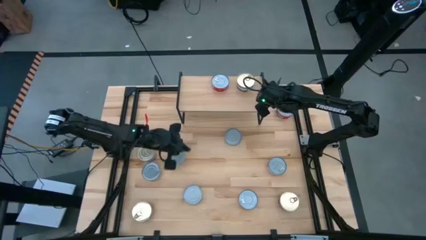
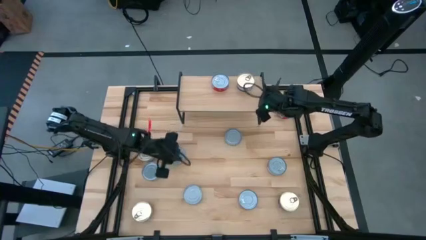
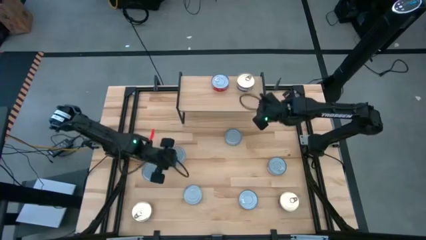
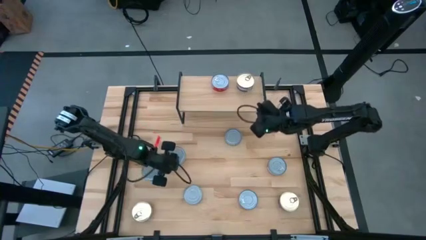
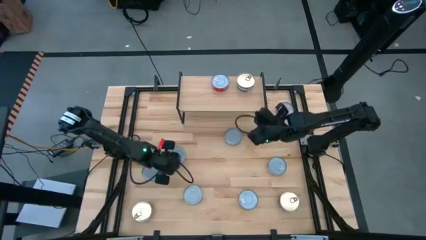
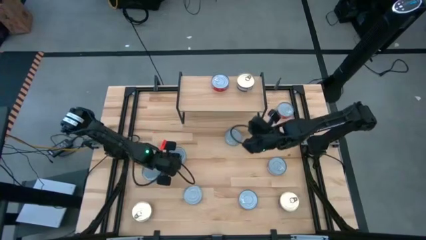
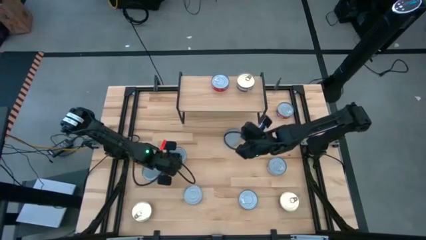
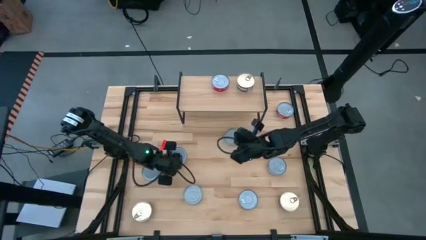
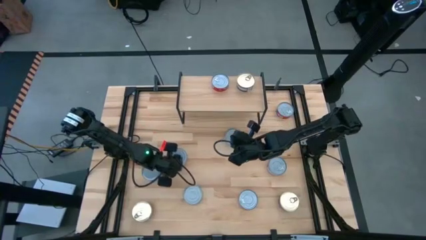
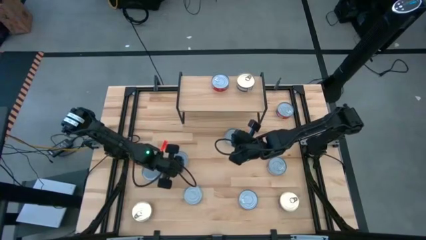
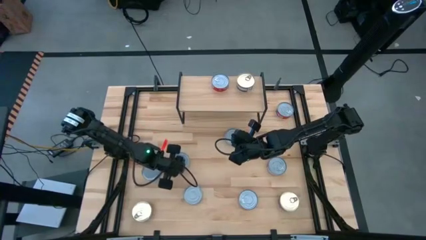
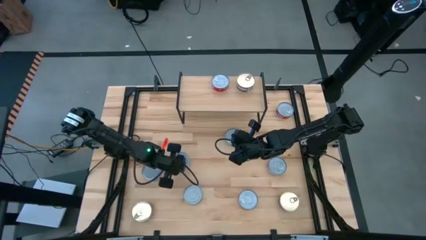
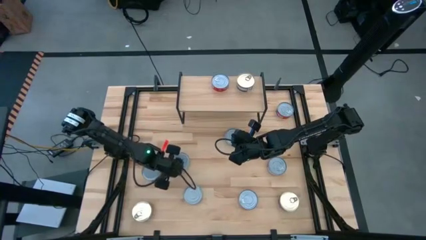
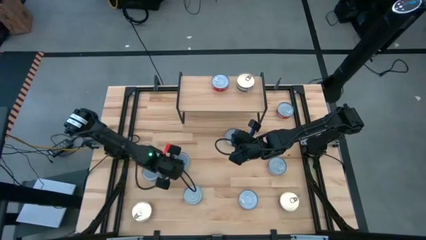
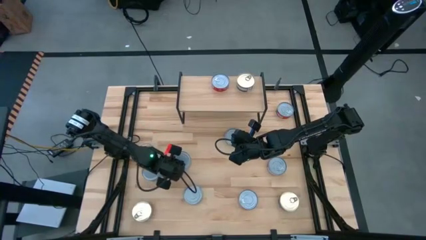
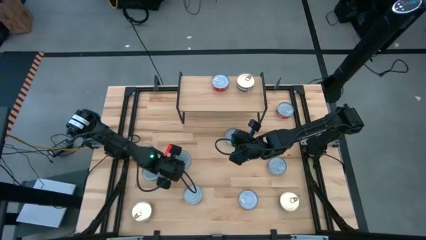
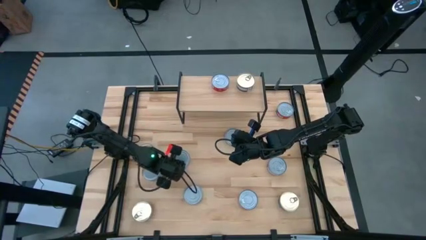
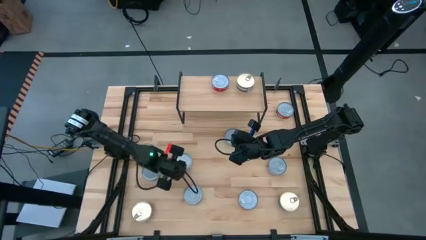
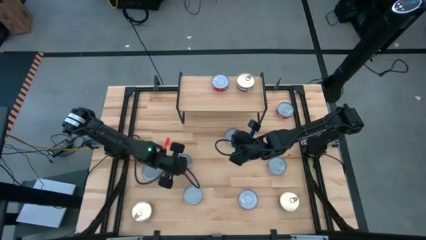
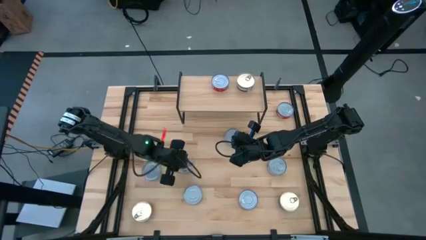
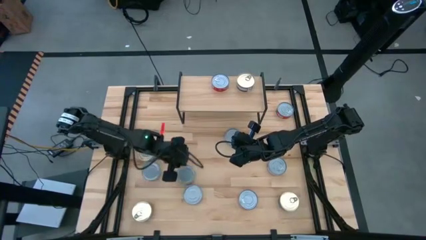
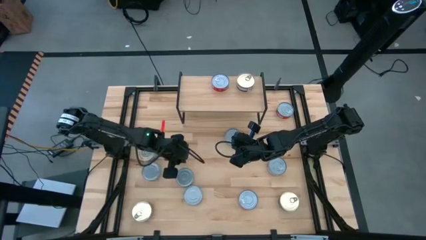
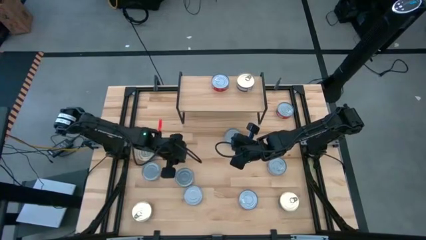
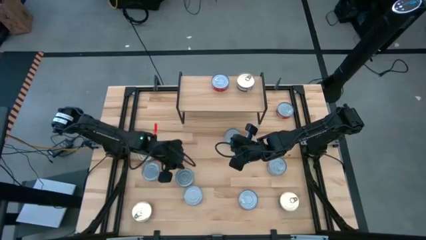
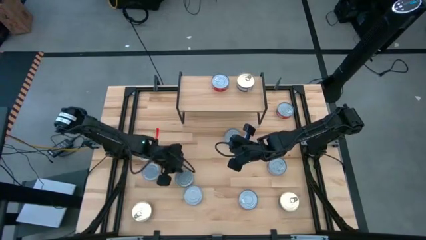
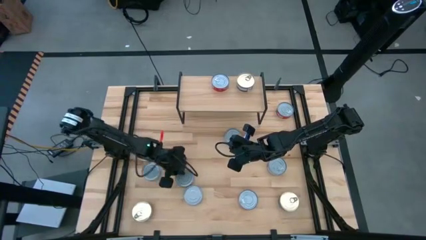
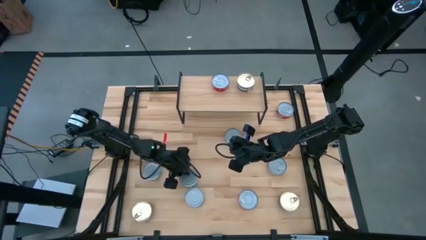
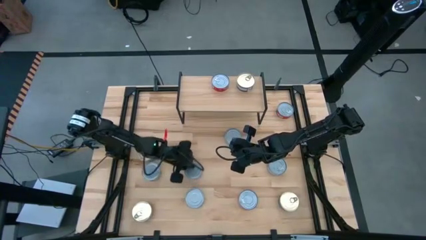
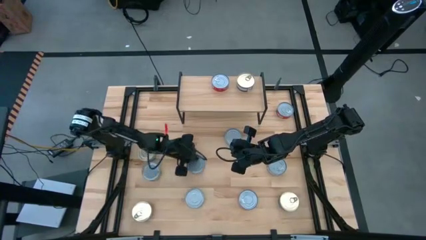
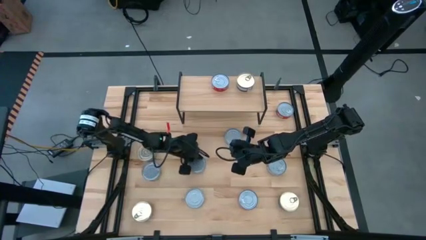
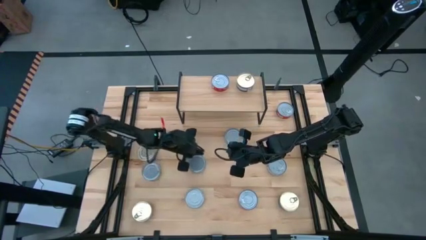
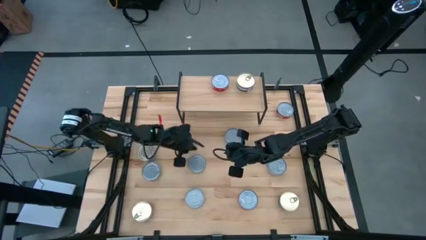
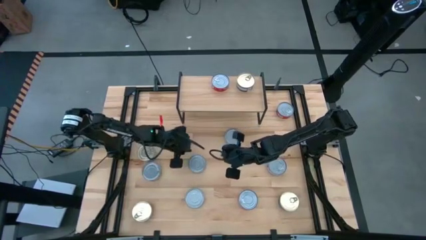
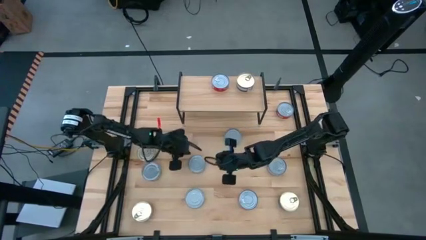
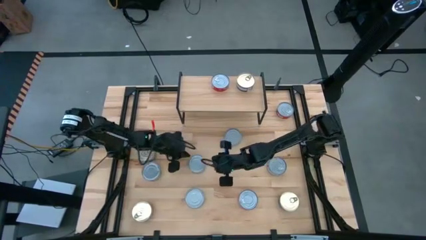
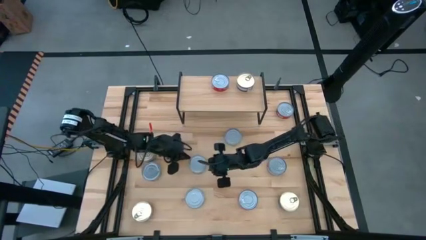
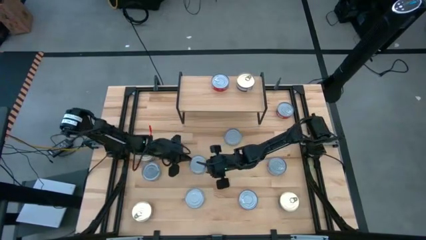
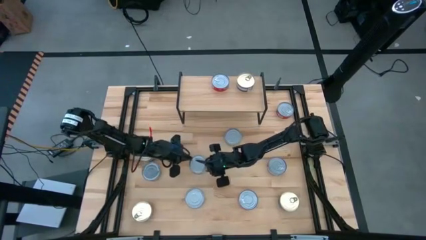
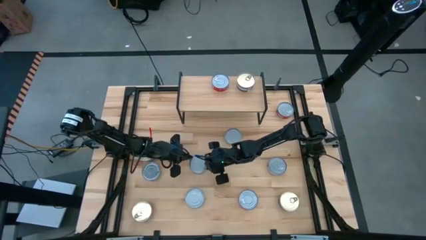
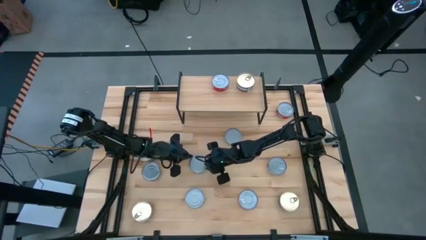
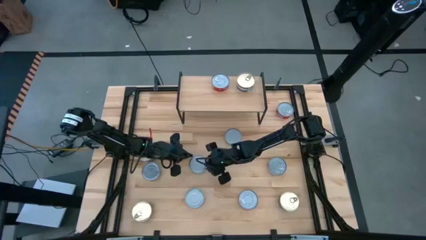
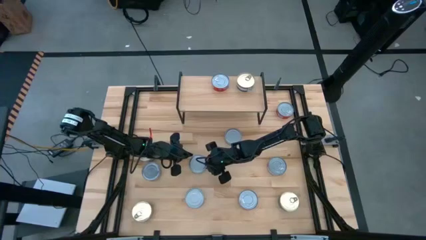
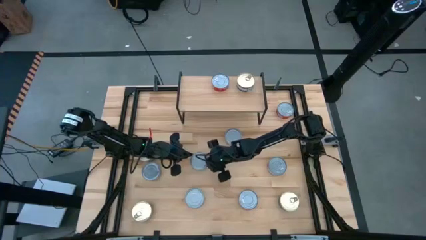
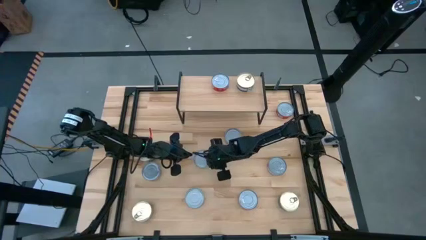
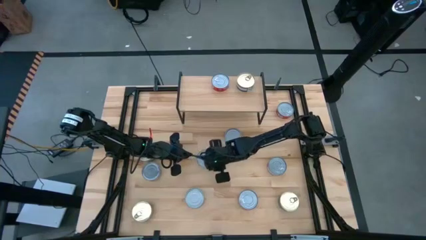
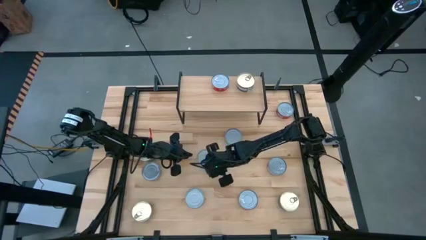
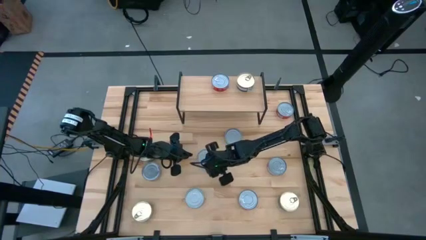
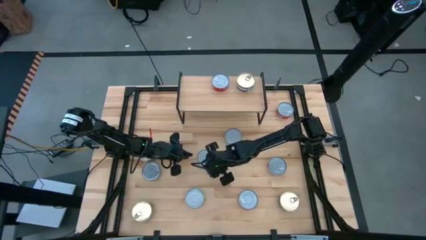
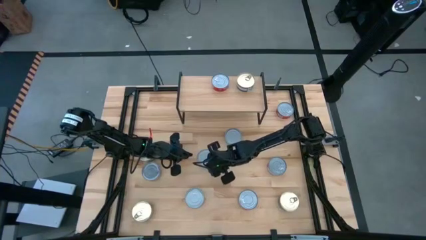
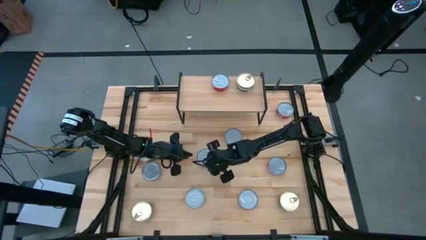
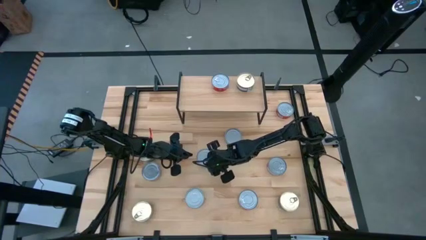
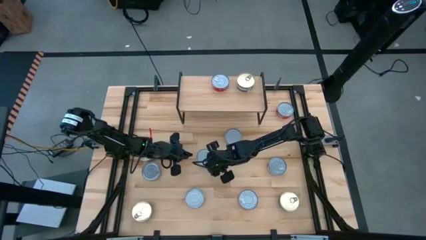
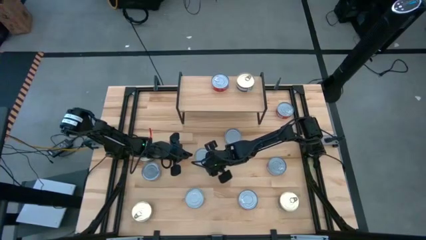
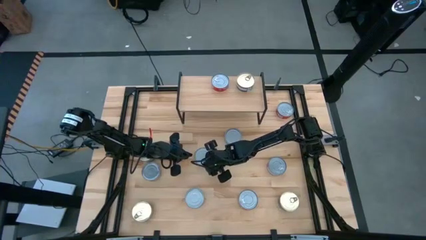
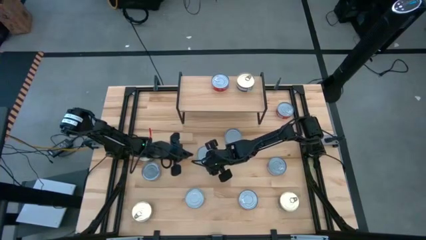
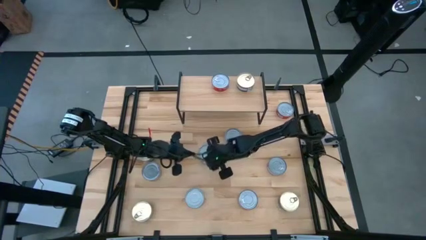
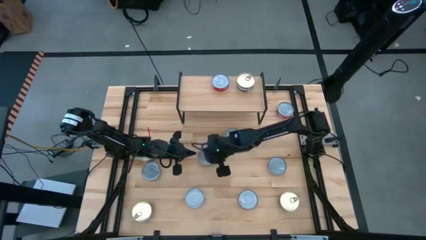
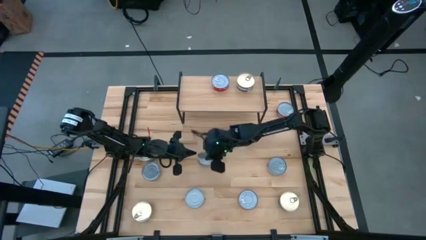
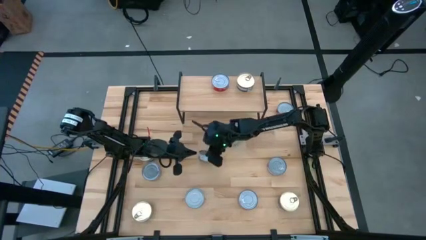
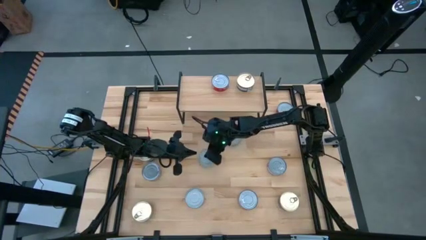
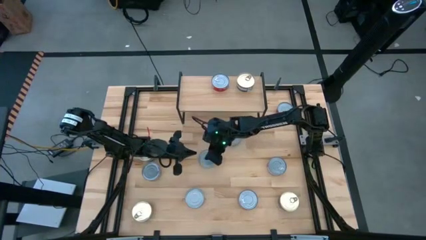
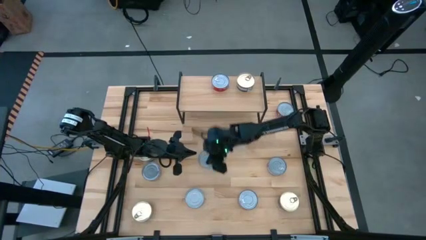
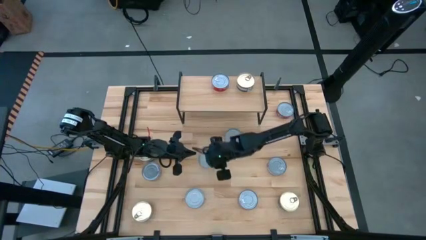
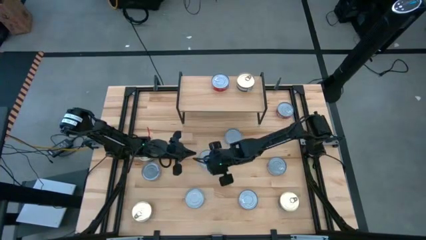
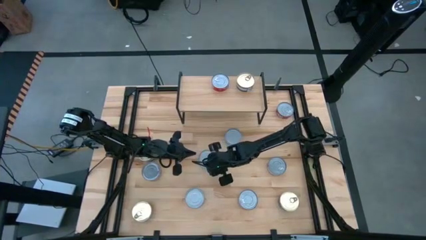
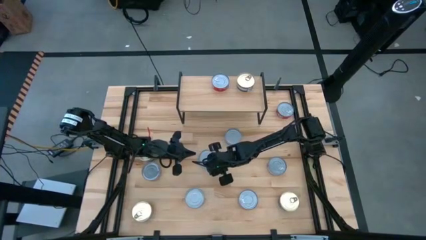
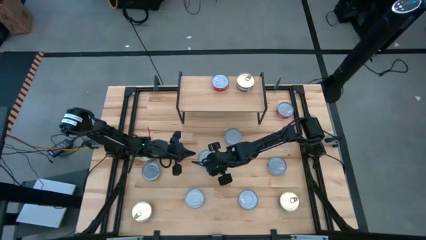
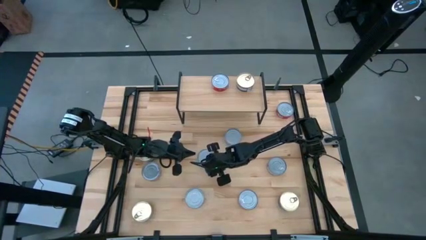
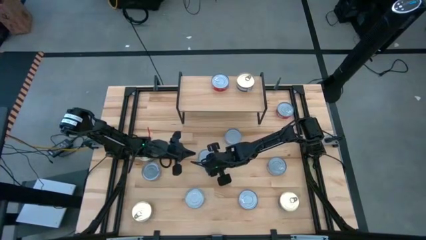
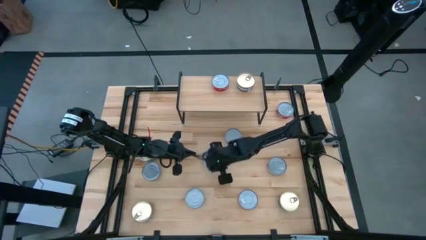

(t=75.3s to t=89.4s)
Task: Stack canned seafood by type on shelf
Put the green and white tuna can on the shelf

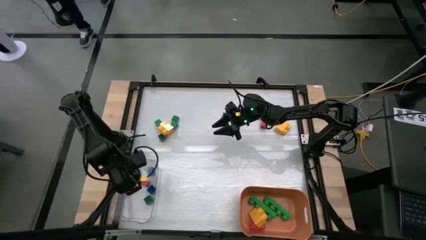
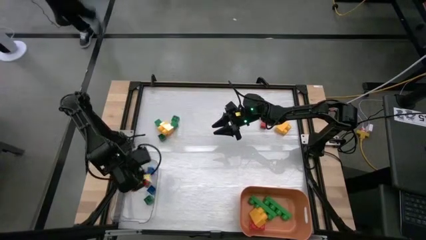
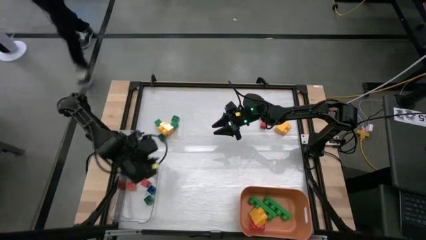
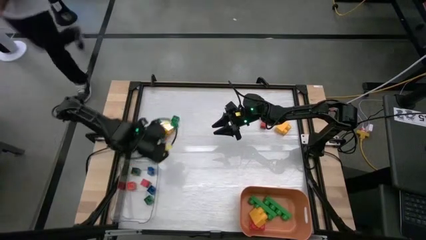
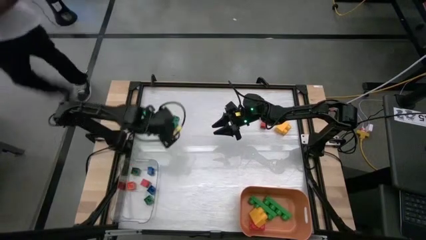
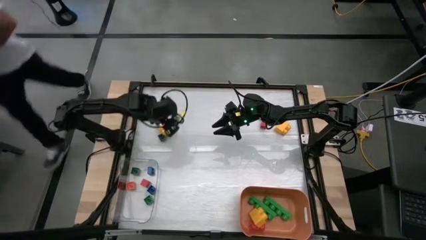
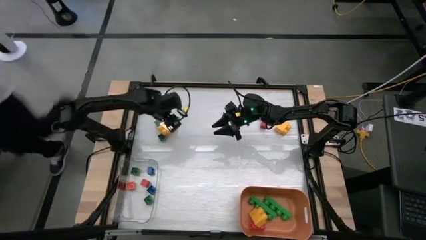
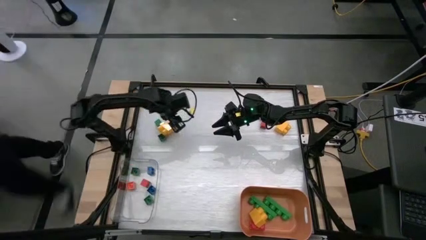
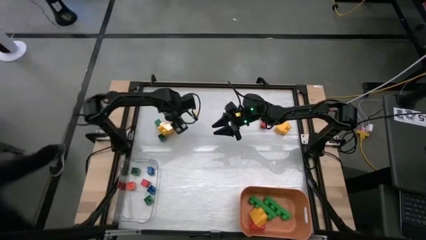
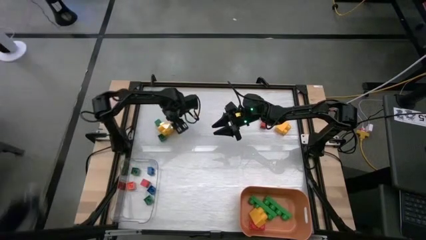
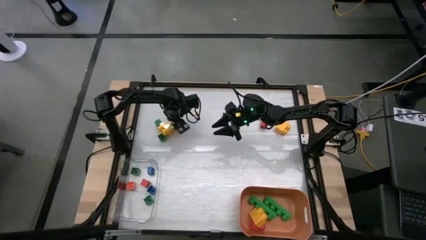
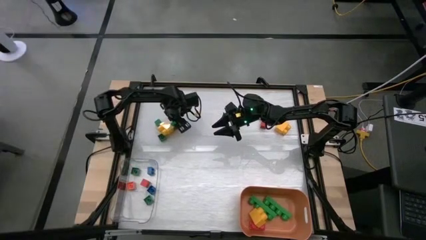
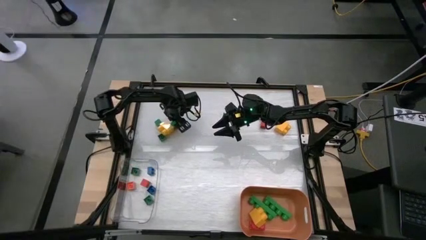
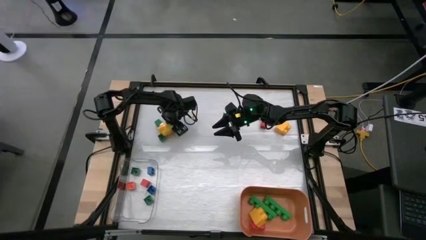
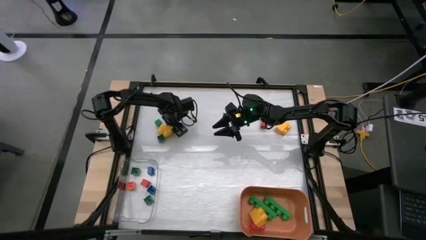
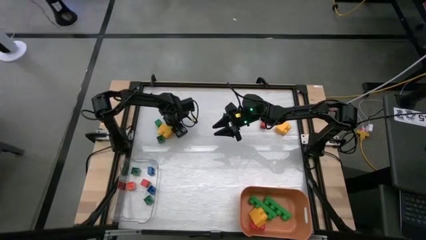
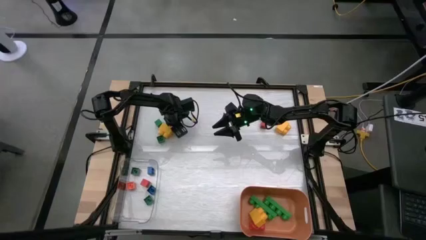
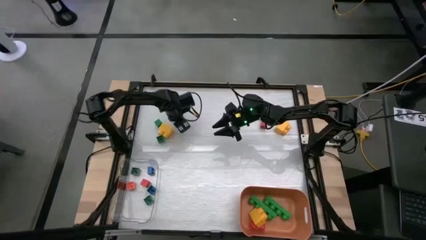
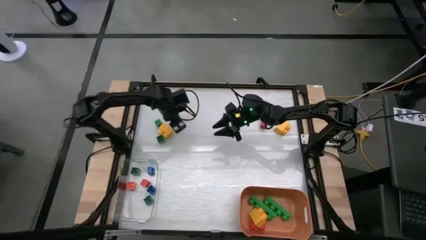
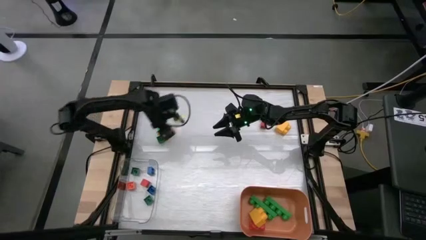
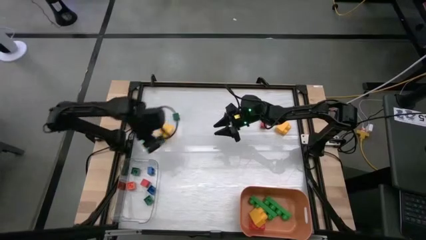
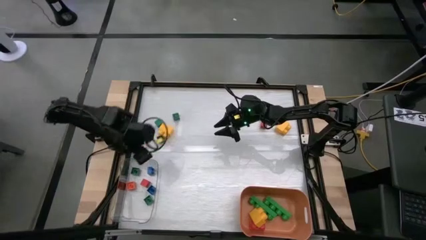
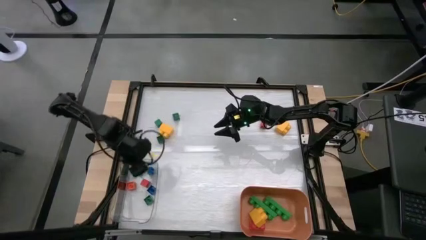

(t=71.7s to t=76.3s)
Task: Sort blocks by size
Put the small green block into the transparent bin
